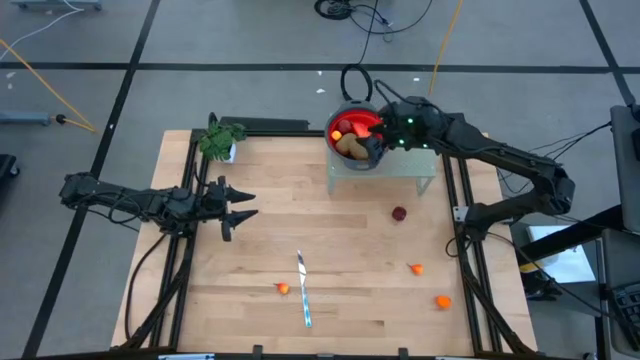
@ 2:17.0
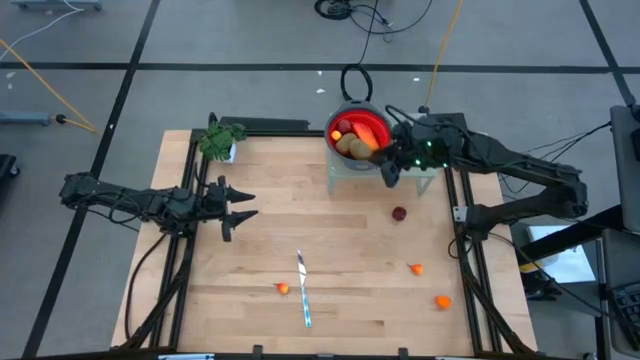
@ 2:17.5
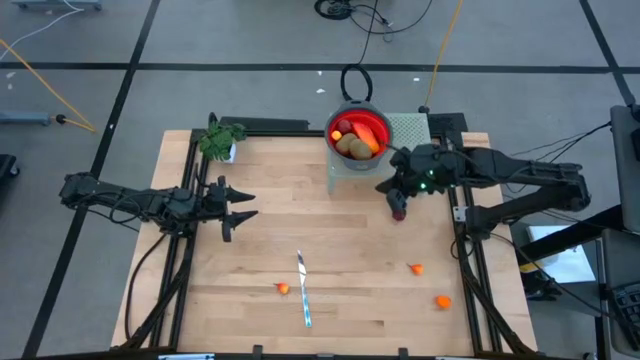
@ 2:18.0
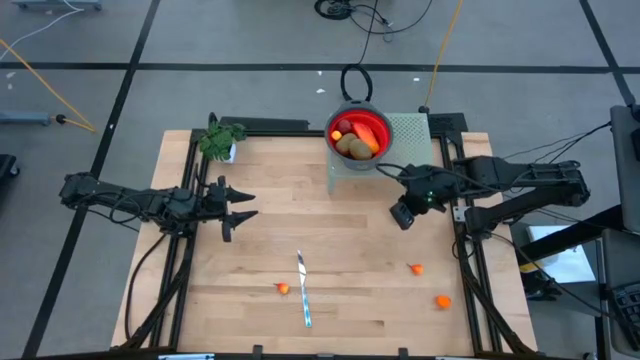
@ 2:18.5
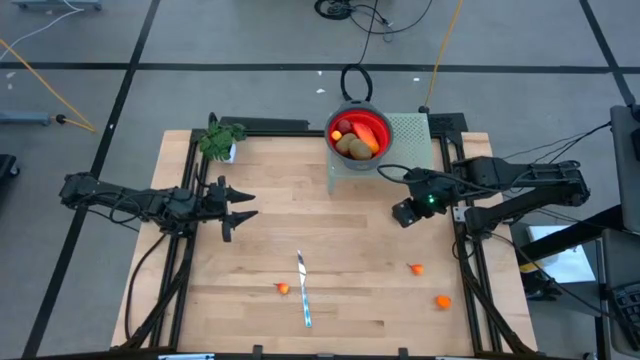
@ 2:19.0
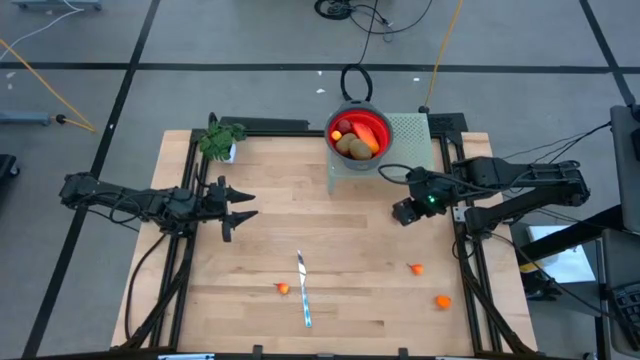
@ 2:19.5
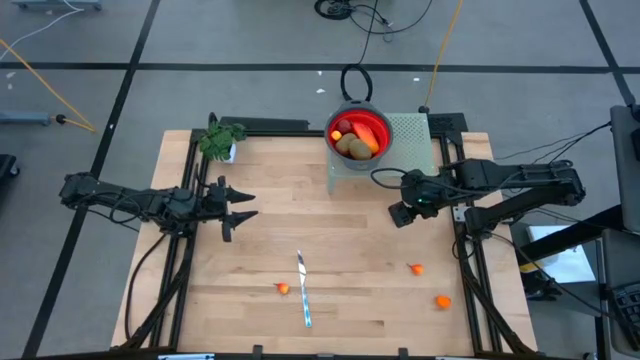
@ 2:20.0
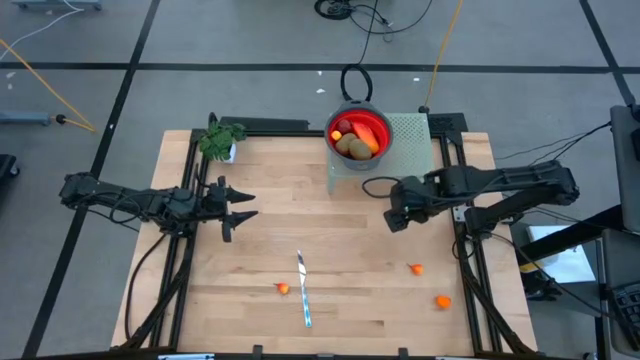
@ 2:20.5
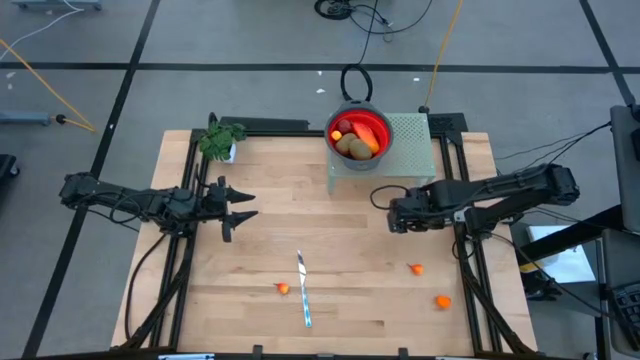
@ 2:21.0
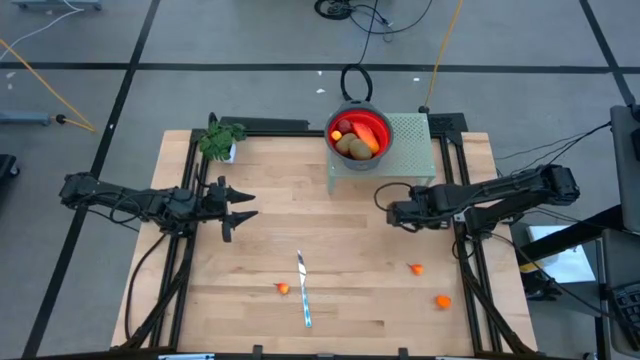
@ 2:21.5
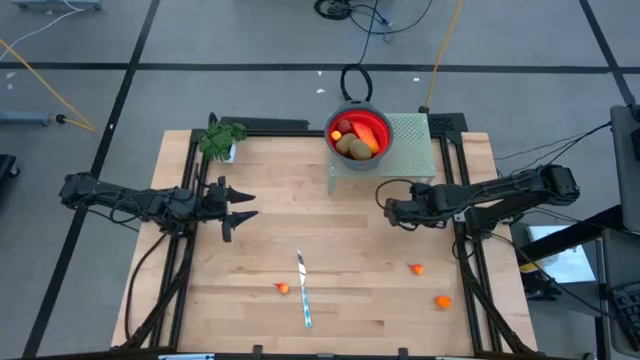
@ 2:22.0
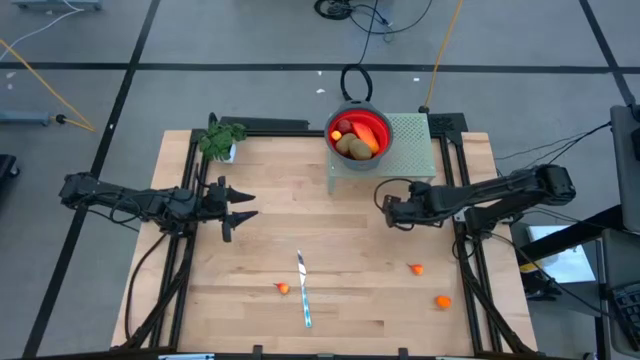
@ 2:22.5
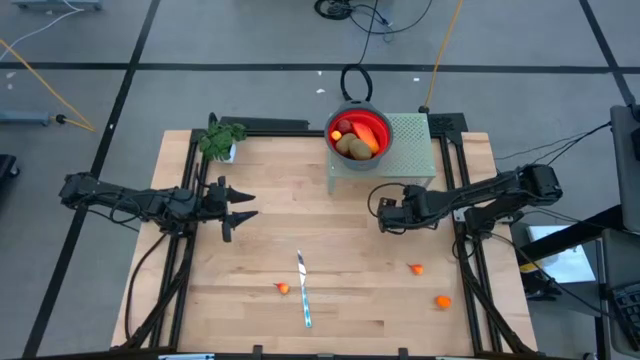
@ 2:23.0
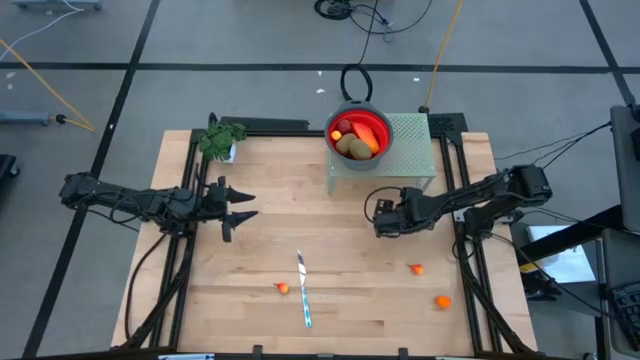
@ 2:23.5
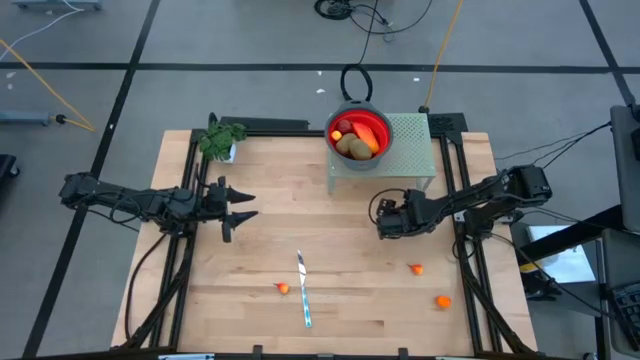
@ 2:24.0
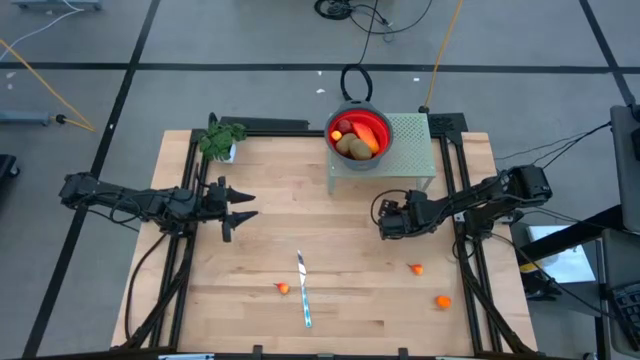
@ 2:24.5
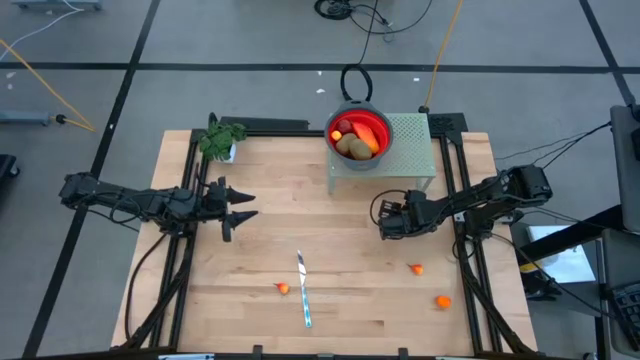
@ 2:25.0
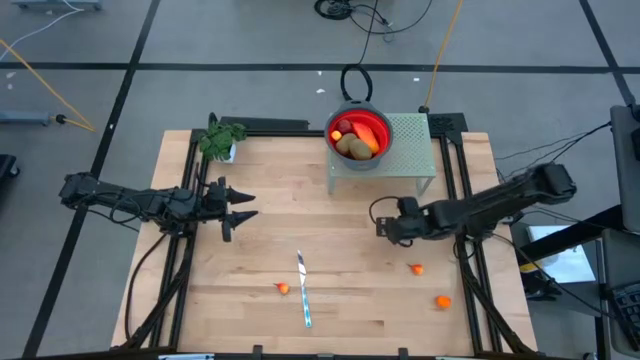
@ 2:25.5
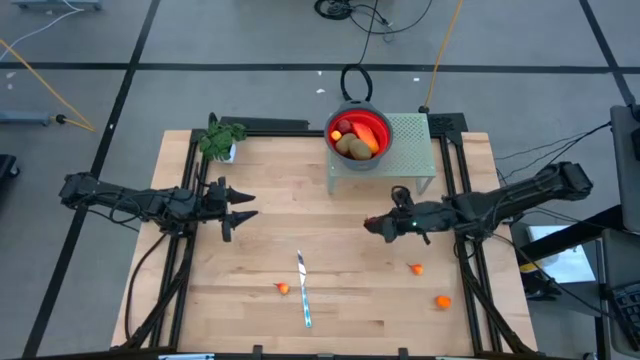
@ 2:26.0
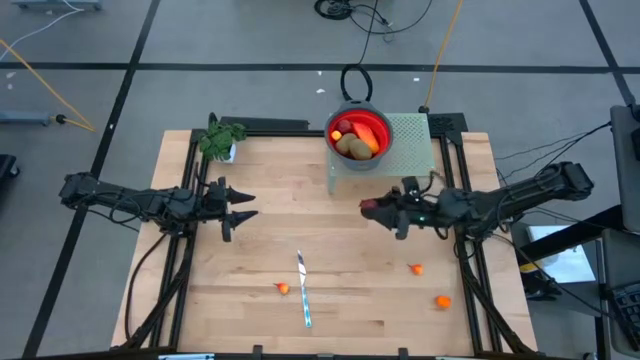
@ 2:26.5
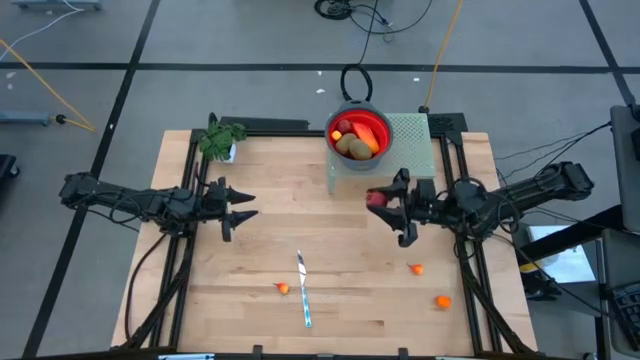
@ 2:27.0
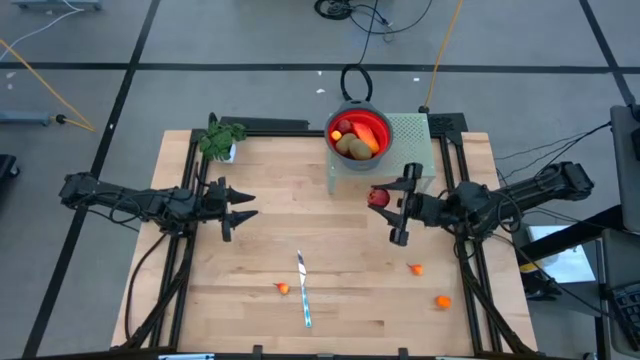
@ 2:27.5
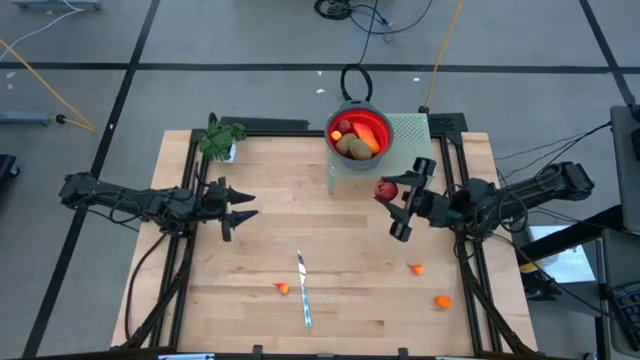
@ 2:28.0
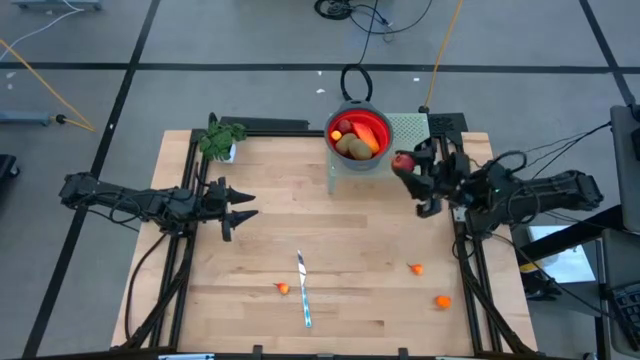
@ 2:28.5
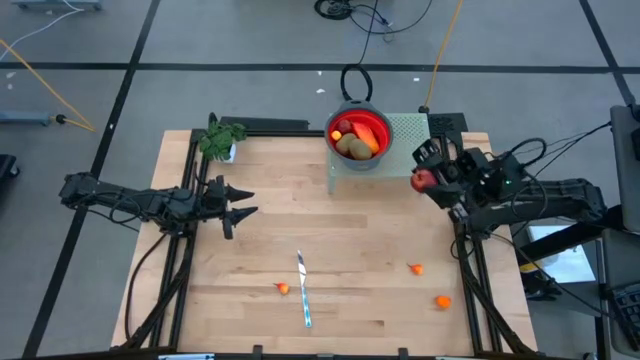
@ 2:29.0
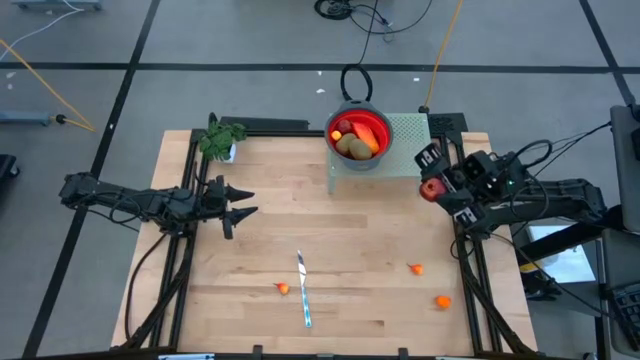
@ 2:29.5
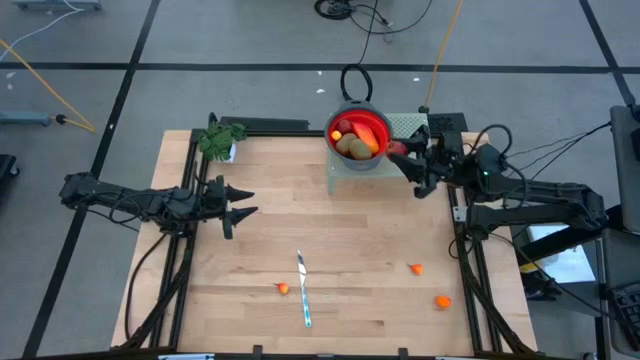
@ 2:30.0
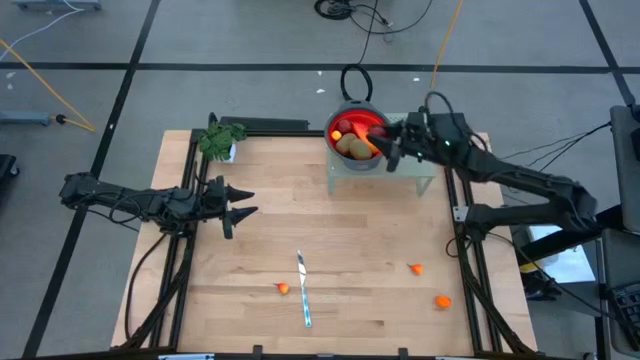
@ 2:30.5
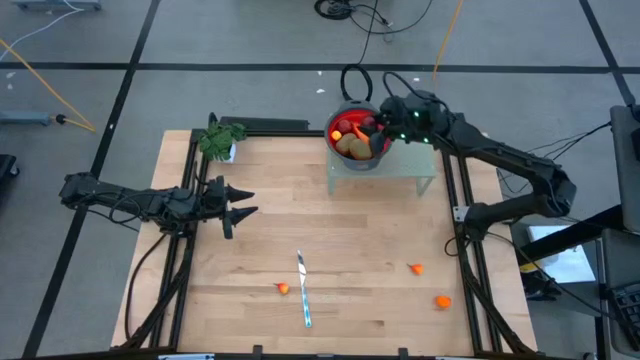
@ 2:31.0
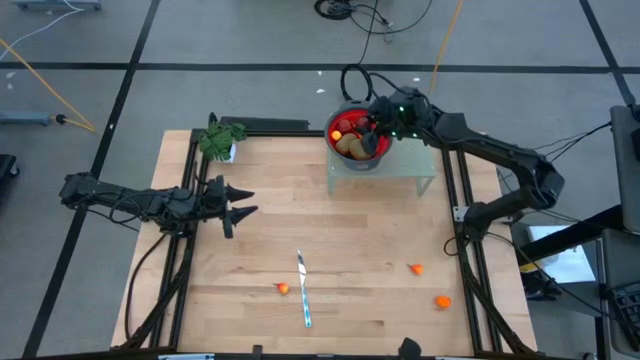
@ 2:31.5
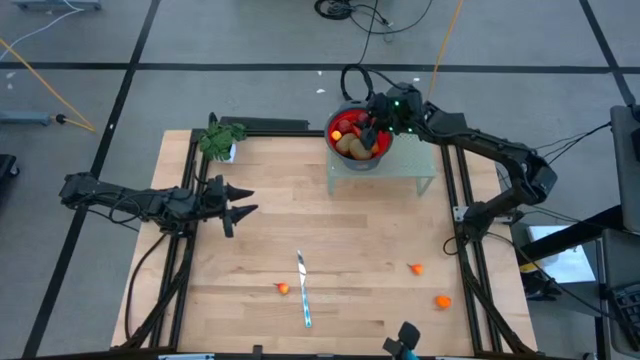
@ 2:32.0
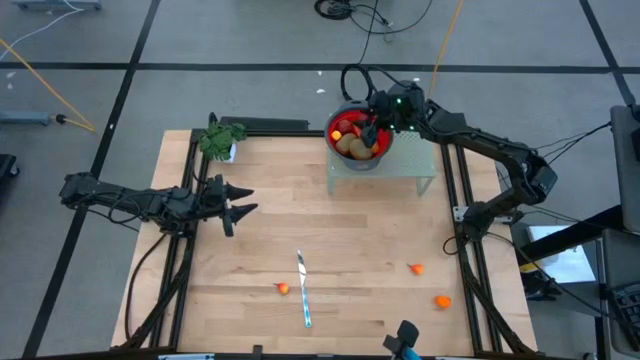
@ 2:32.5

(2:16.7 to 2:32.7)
Task: Pick & Place Fruit
Put the pomegranate into the red strainer bowl on the shelf

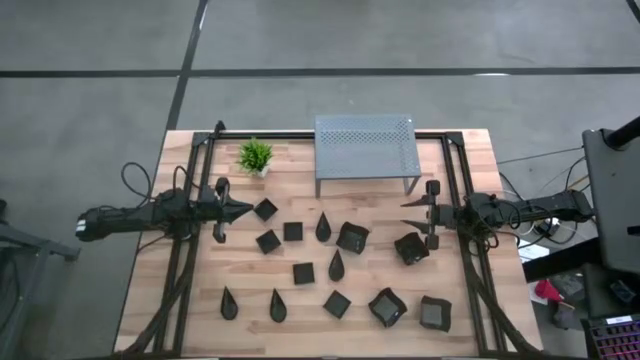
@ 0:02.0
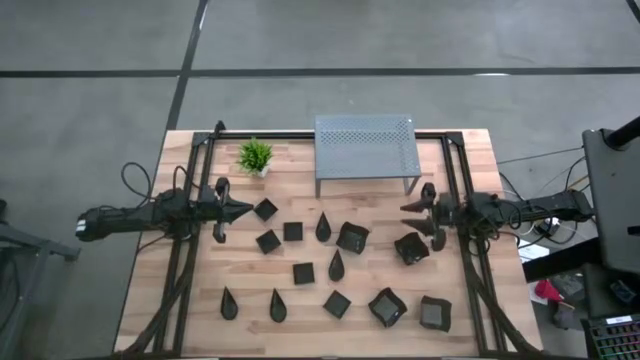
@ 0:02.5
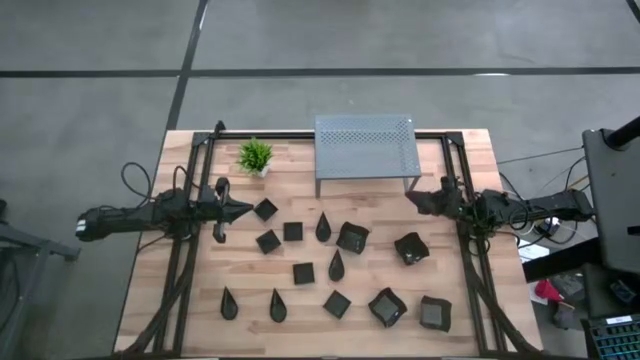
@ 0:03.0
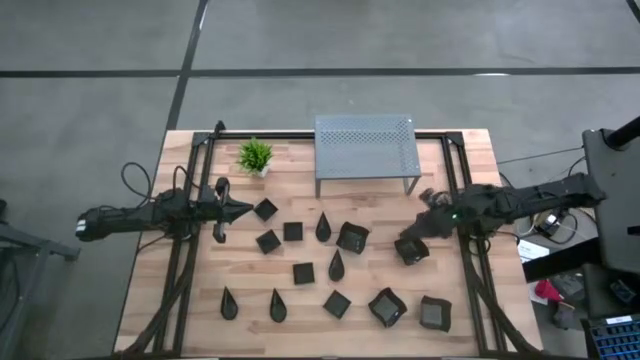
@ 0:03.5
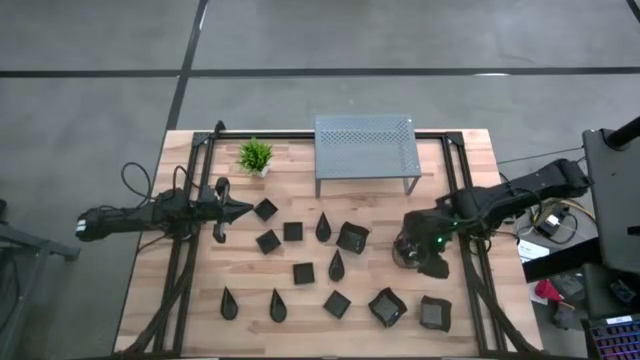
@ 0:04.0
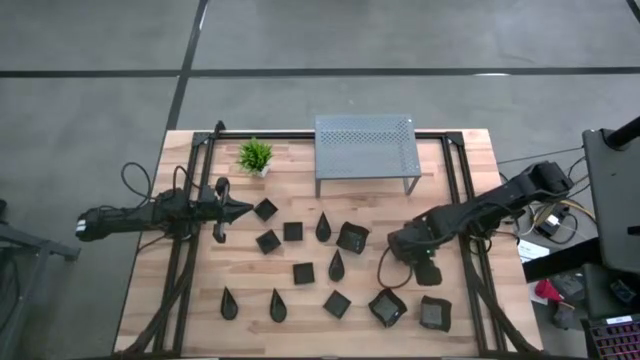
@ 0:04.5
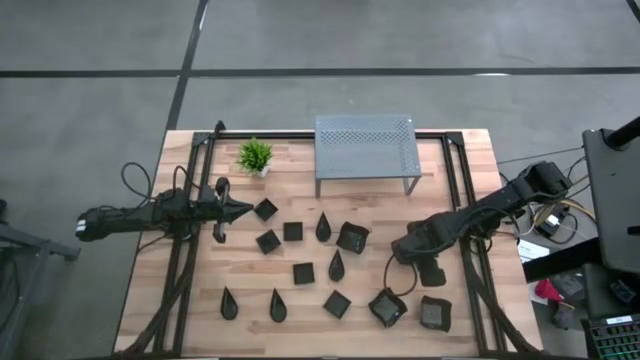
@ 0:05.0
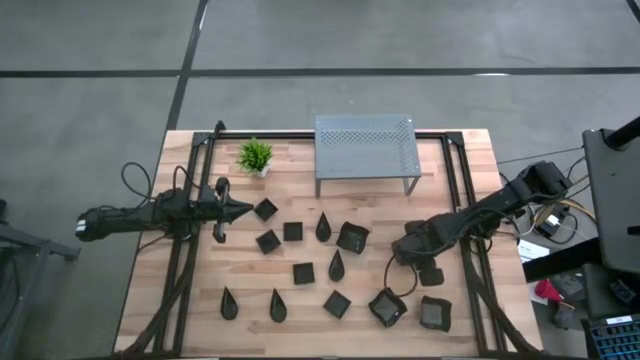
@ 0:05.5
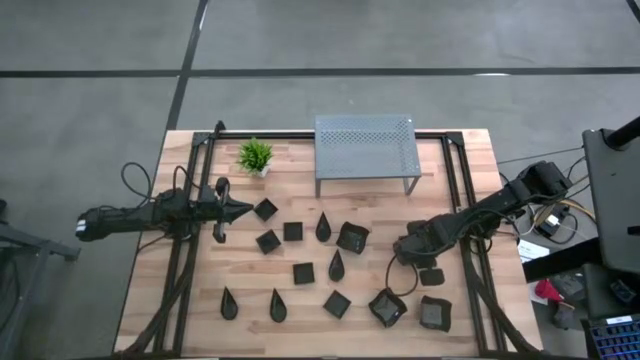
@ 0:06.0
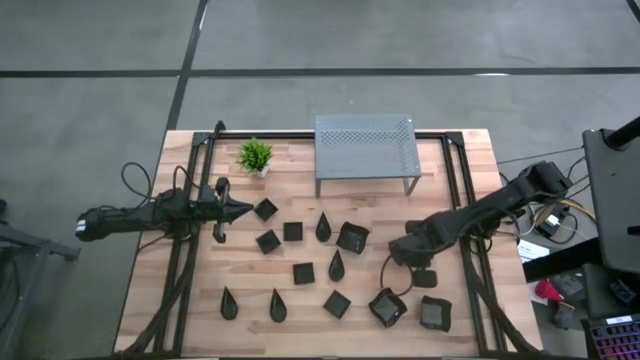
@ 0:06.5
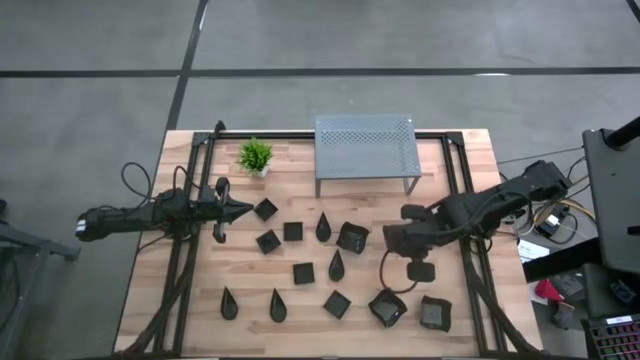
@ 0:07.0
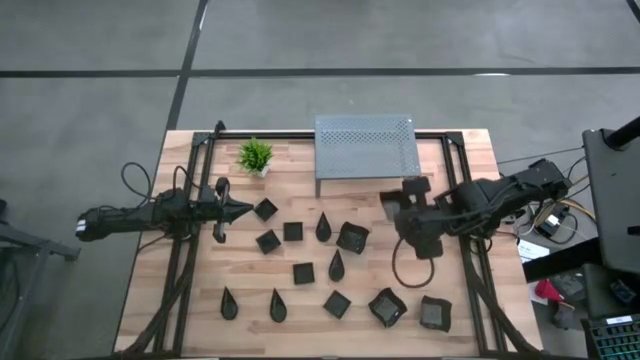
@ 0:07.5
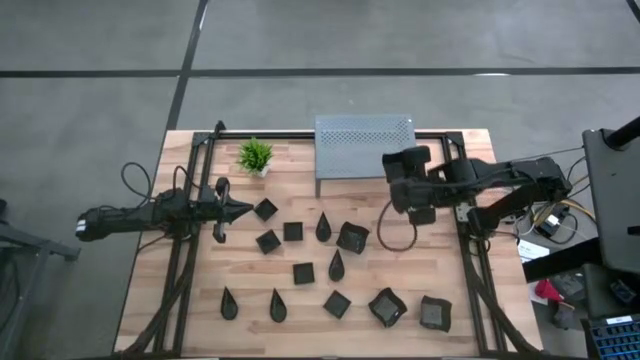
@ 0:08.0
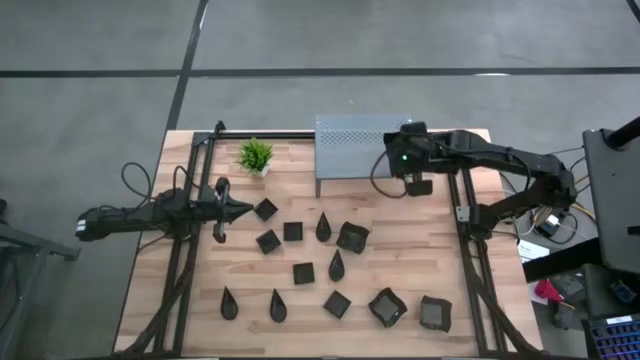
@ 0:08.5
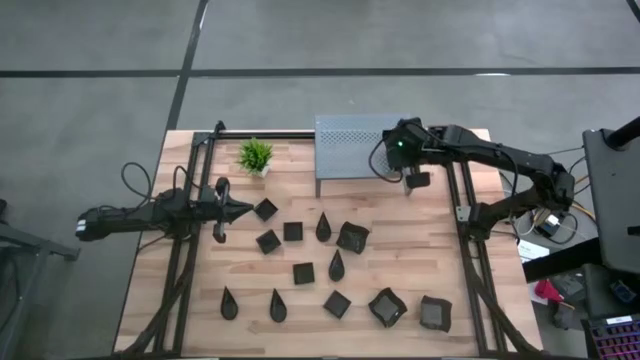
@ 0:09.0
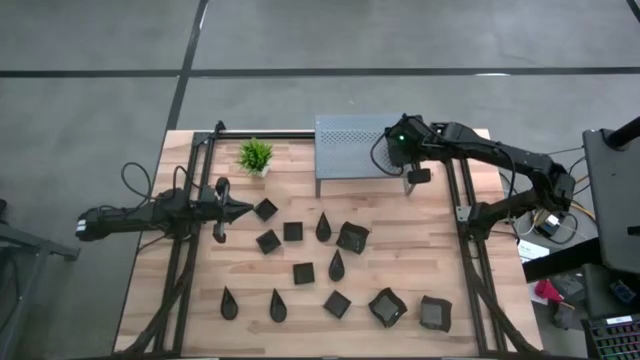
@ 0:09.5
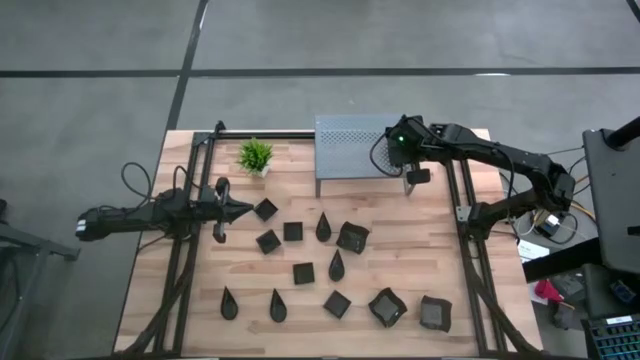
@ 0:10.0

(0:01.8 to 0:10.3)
Task: Pick & Place Mini shaped plates
Put the black distorted square plate on the shelf
